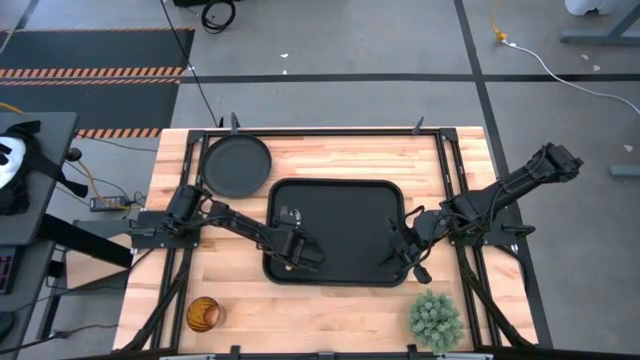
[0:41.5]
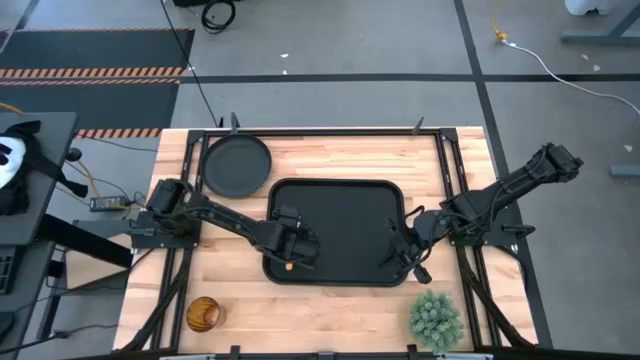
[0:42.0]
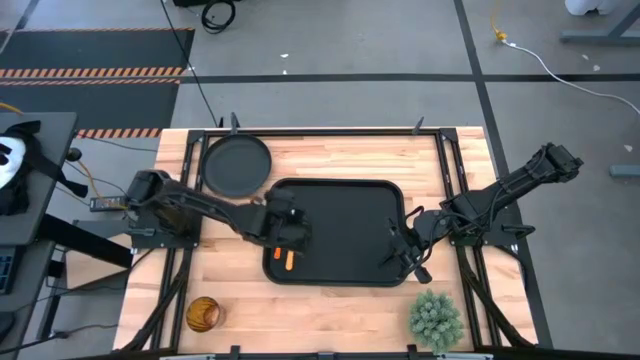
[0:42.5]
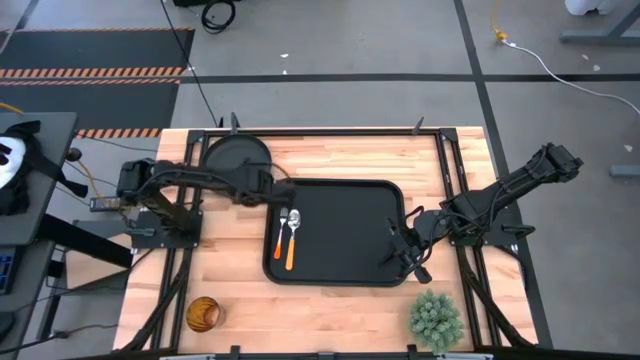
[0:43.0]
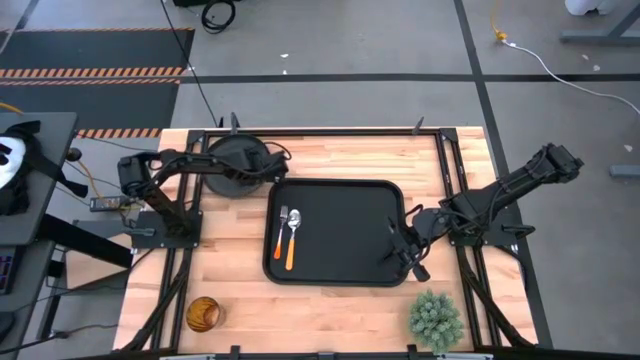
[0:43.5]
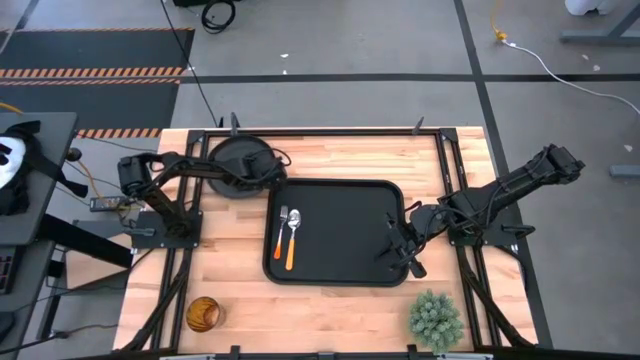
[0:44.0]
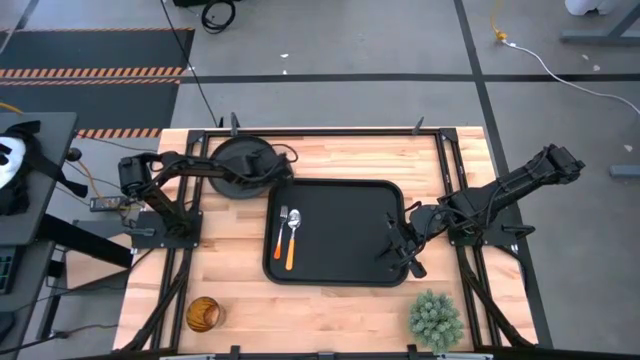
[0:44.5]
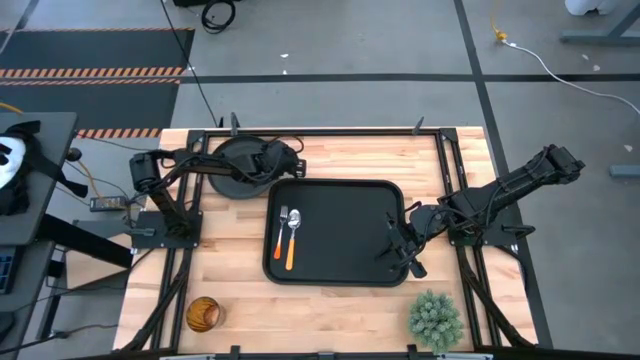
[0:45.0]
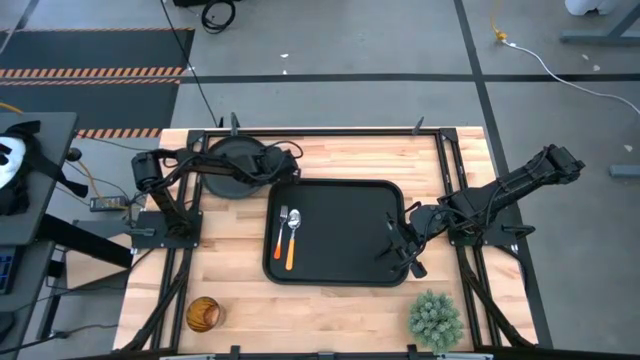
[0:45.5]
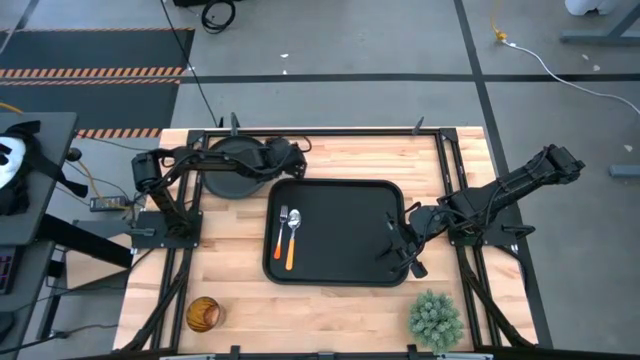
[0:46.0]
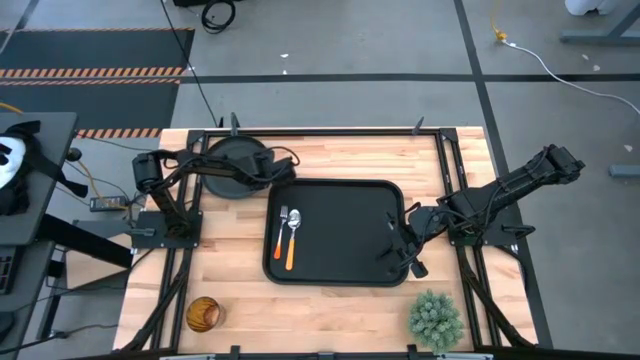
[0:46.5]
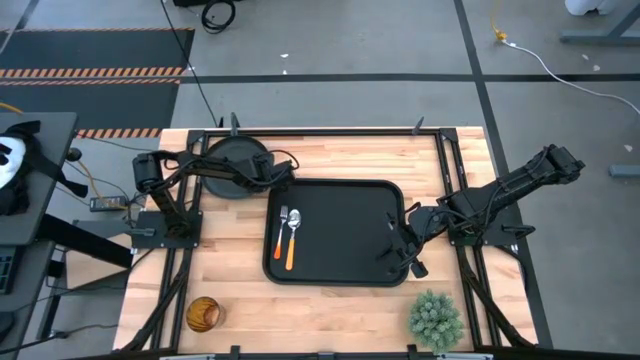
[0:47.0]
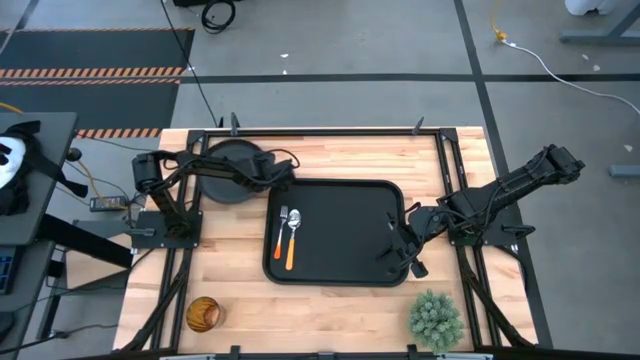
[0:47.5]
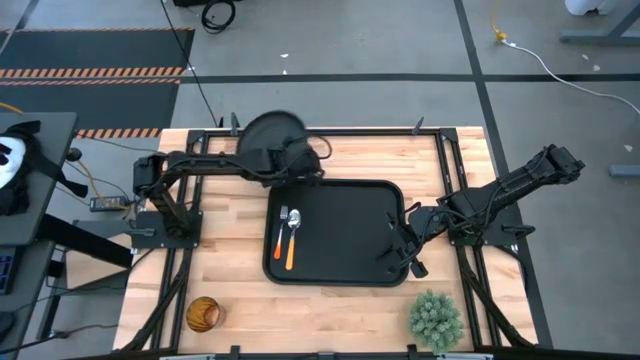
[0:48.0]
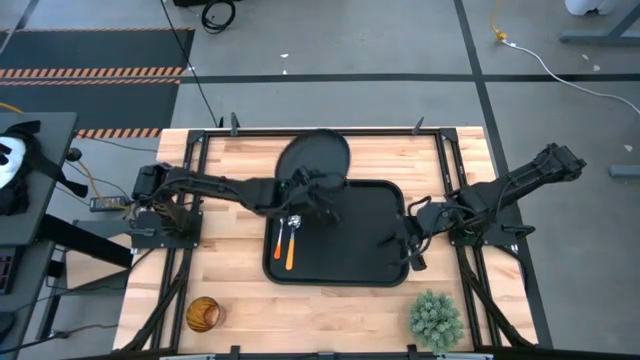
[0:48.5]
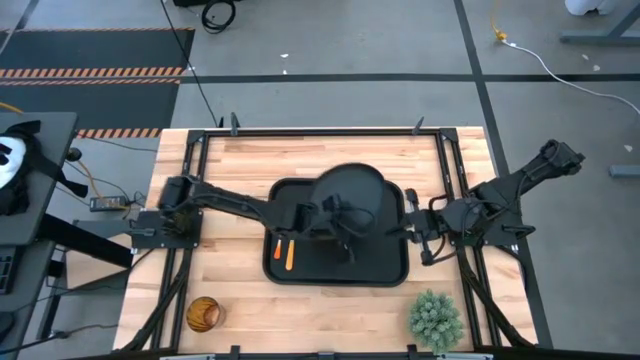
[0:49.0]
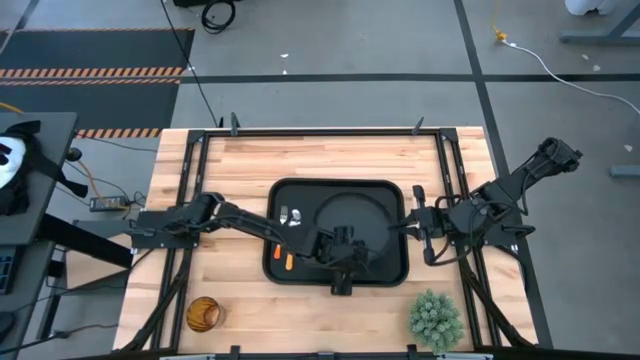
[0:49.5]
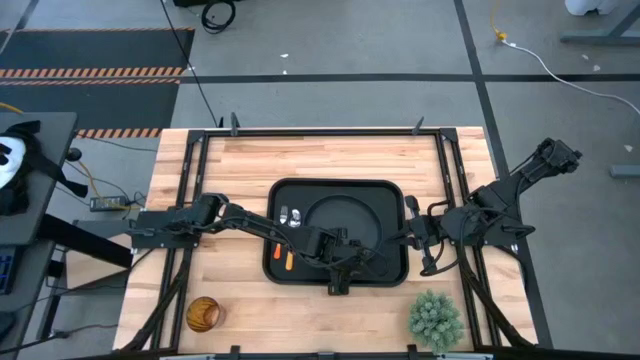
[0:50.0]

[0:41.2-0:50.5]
Task: Pick and place plate/cup/fork/spoon on tray
Put the black plate on the black tray to the right of the yellow spoon

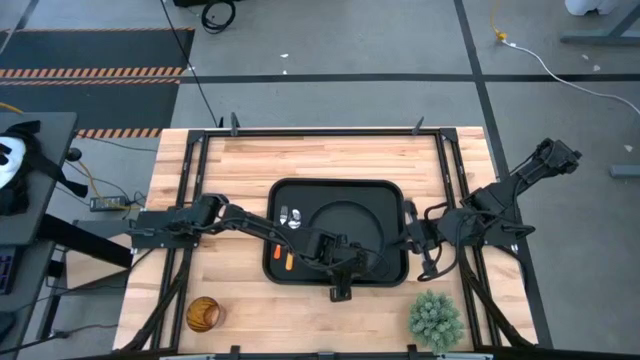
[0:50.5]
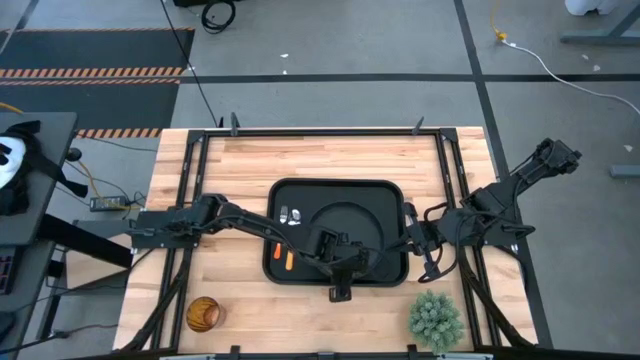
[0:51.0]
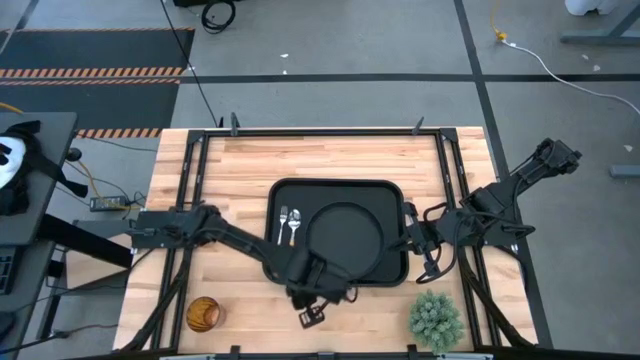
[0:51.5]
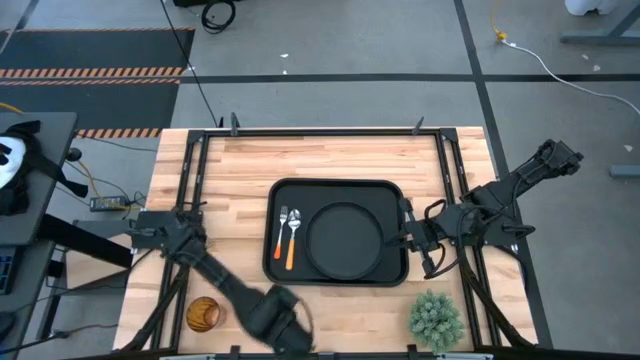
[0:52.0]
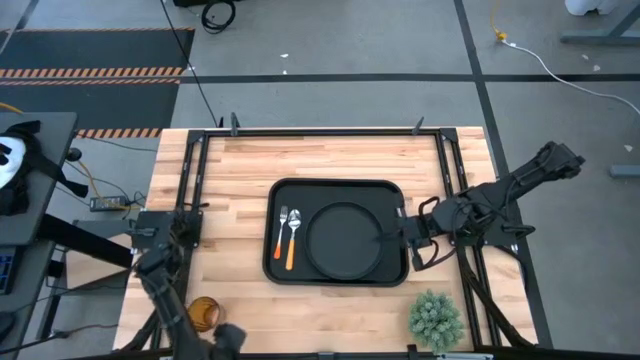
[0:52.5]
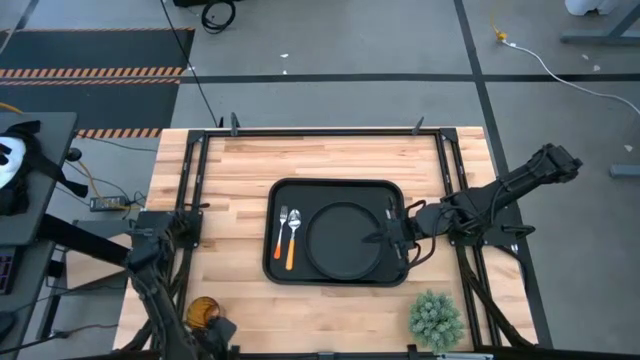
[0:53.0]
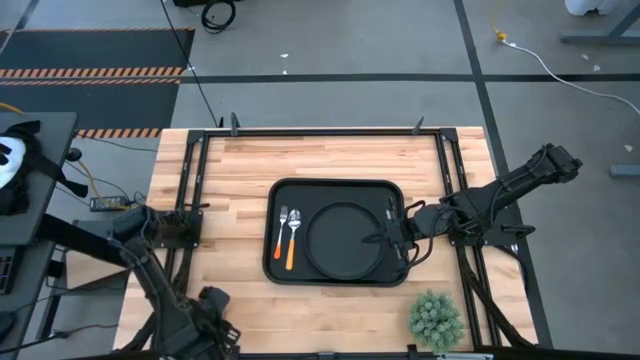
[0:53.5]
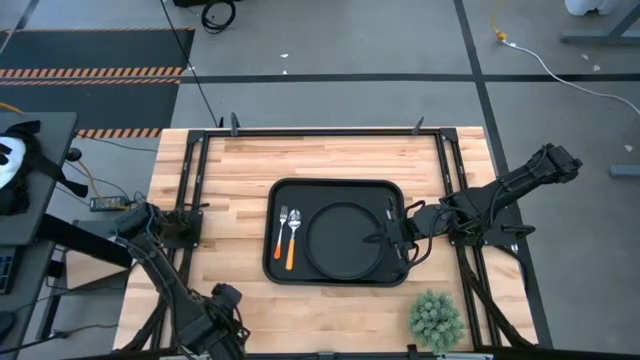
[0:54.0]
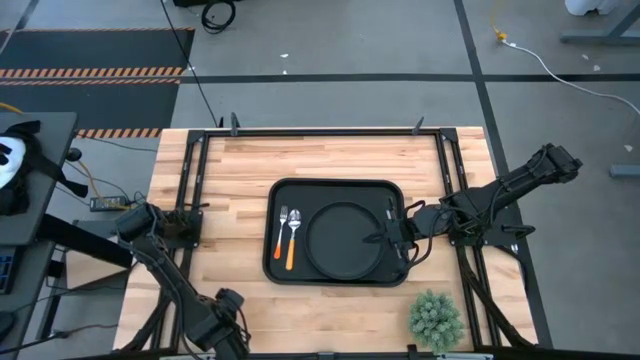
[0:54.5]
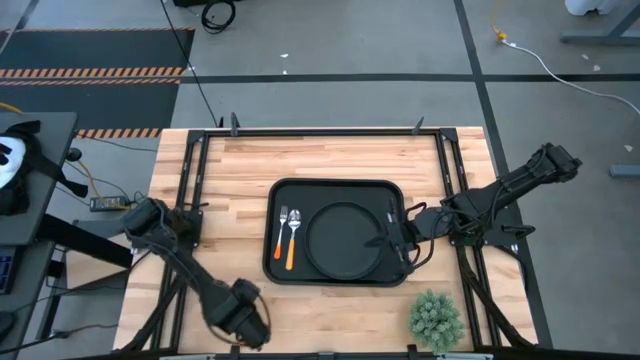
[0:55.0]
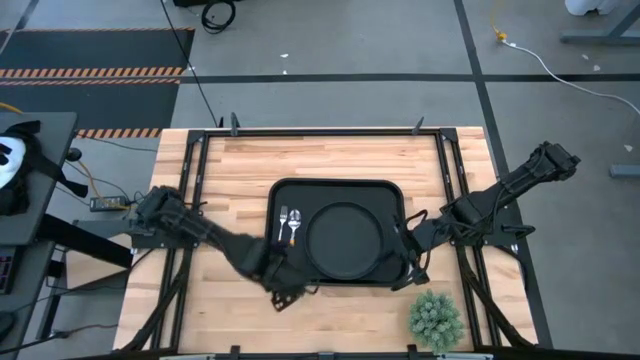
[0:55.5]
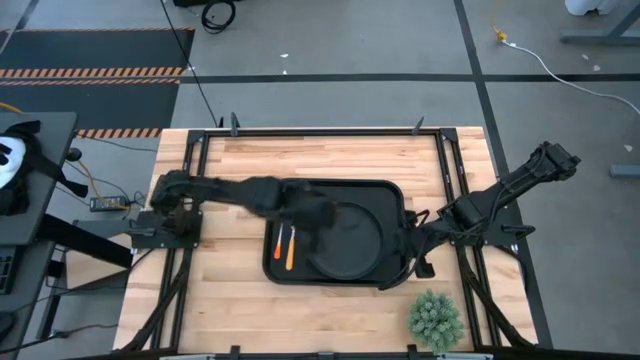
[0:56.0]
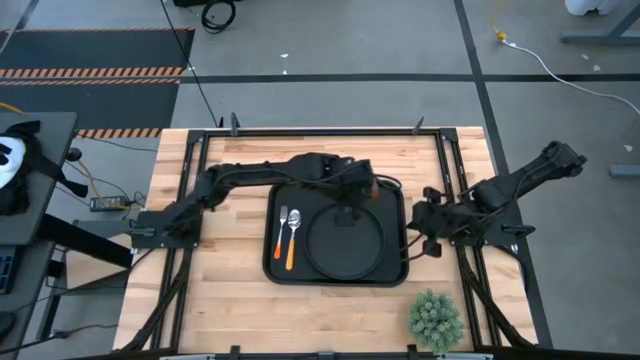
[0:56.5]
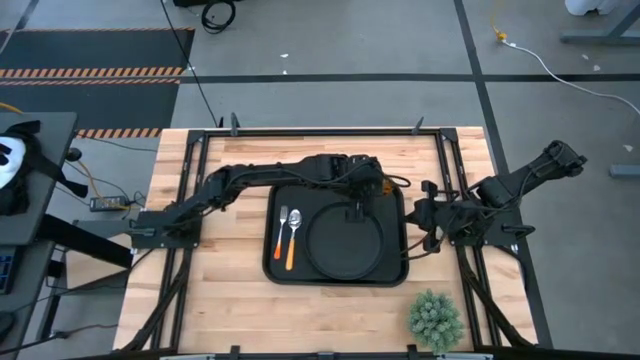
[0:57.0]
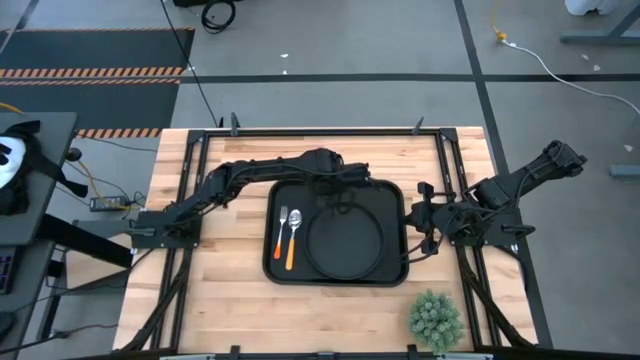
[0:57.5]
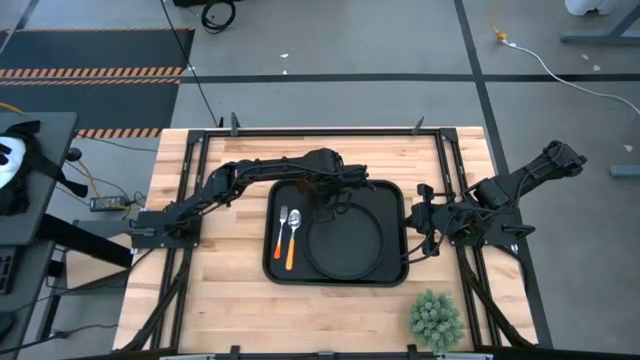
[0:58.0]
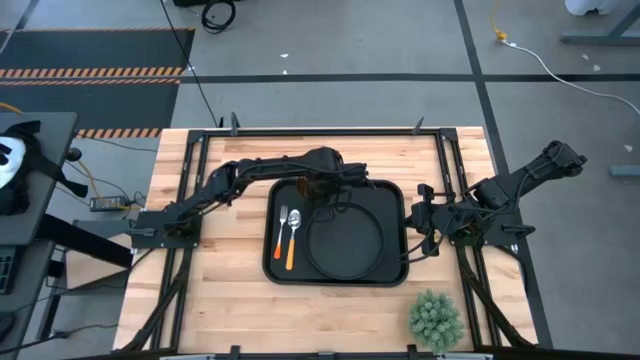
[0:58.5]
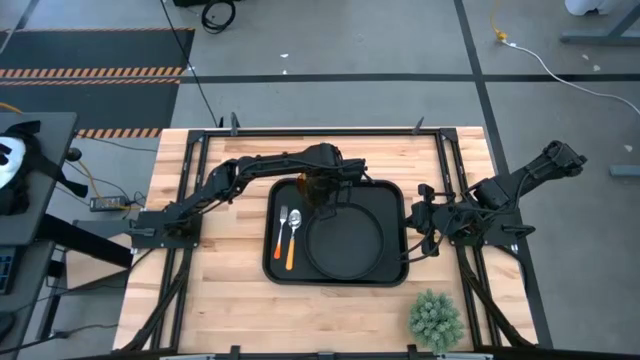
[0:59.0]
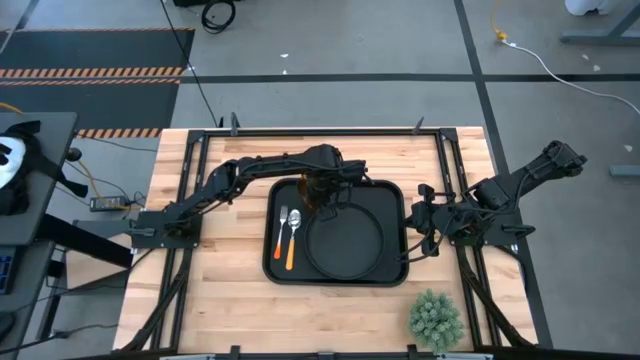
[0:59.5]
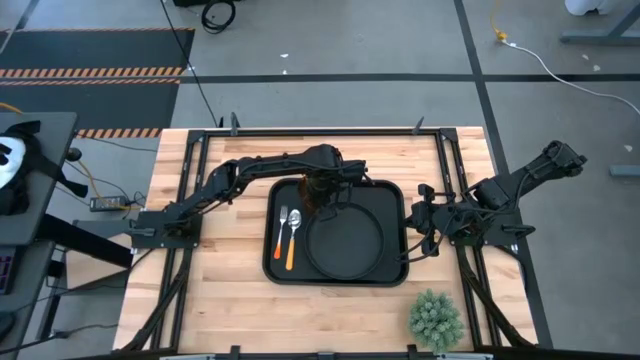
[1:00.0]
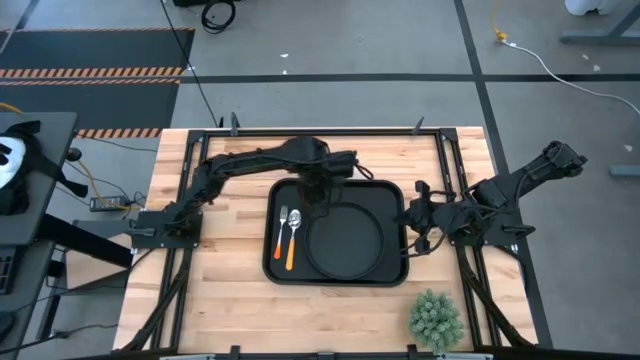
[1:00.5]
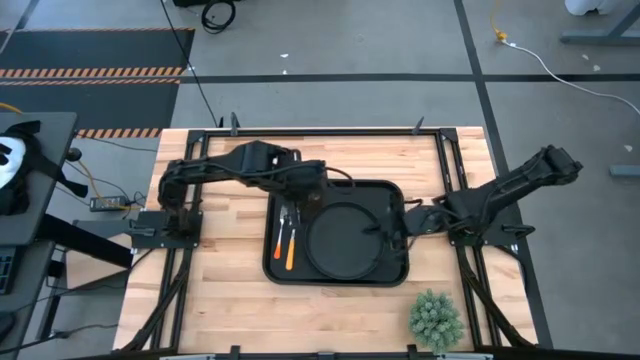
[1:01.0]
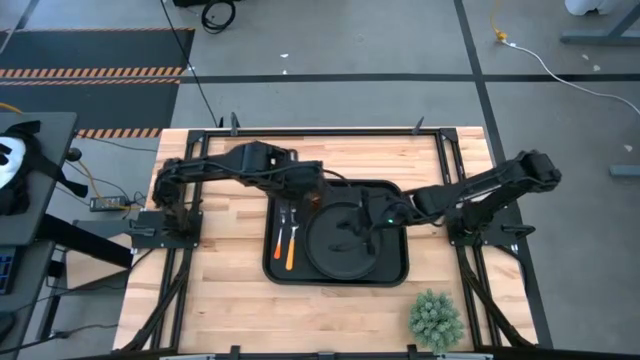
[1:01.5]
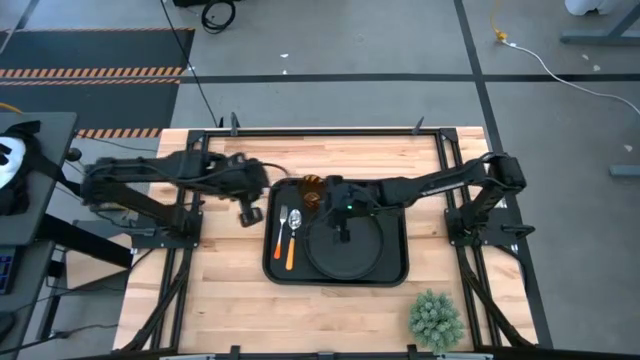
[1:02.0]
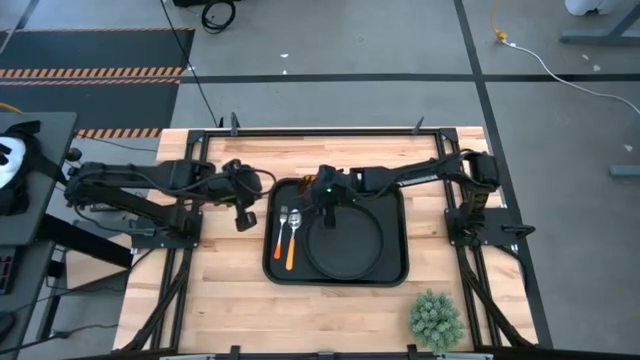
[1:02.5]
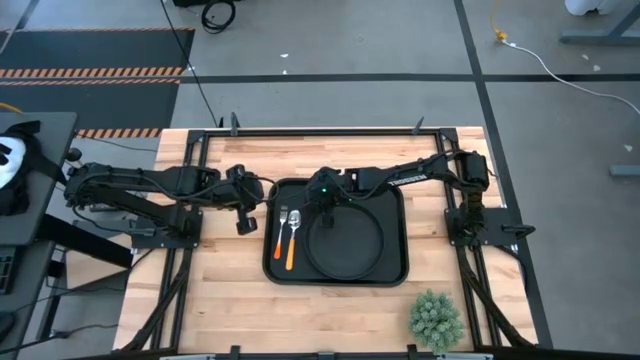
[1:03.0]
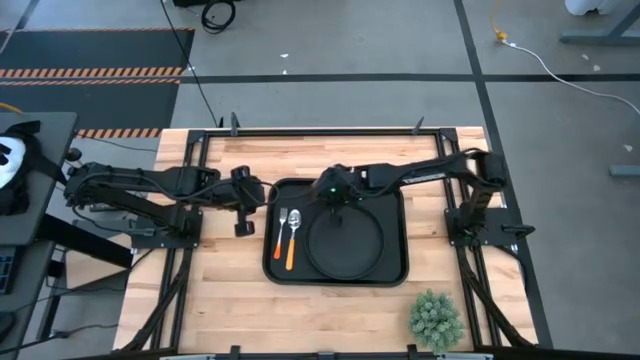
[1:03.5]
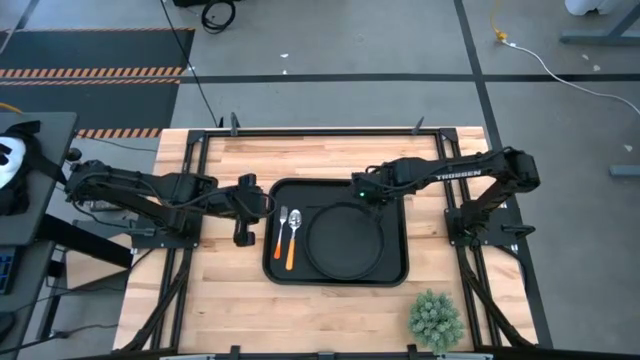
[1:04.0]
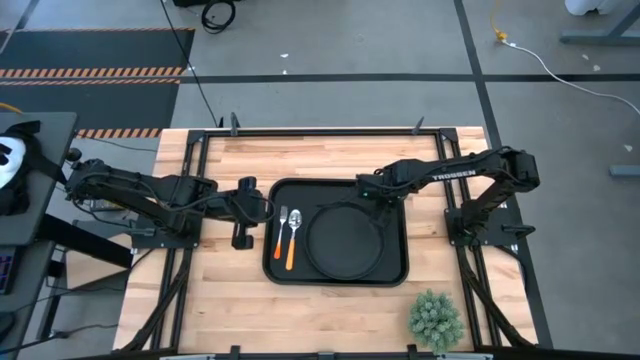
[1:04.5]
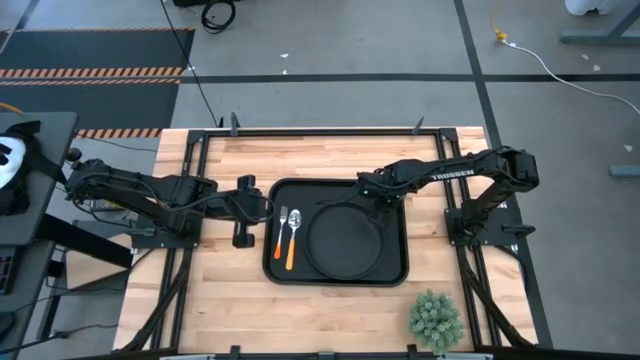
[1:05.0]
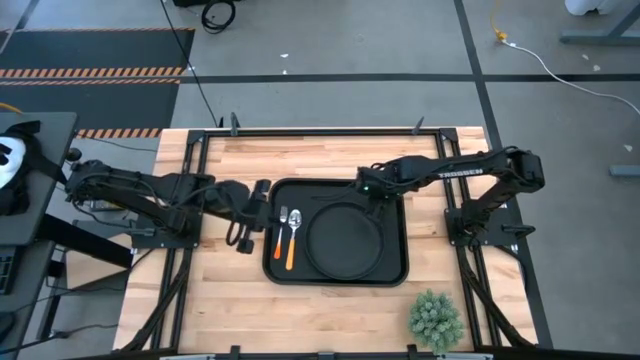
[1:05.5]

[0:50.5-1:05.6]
Put the brown cup on the black tray to the top right of the black plate
